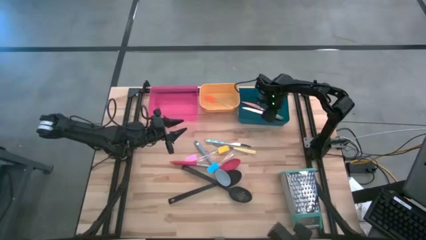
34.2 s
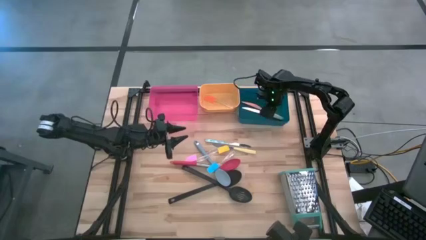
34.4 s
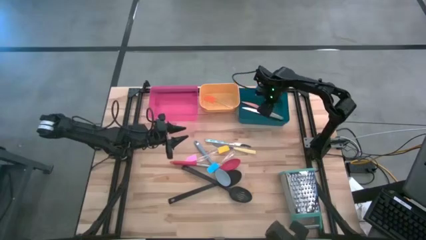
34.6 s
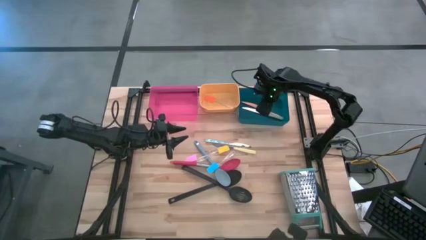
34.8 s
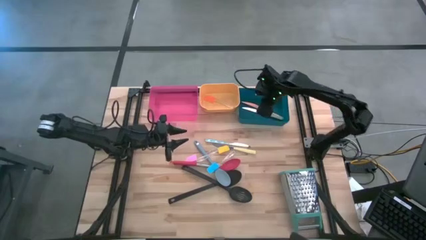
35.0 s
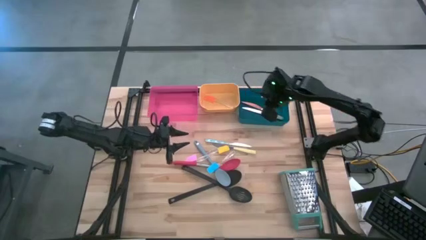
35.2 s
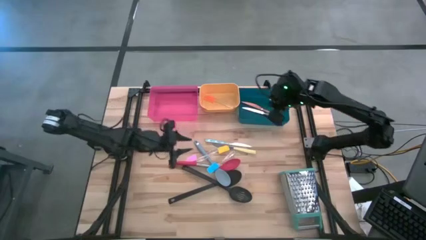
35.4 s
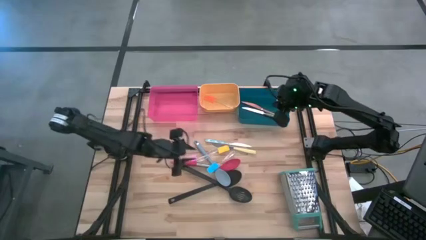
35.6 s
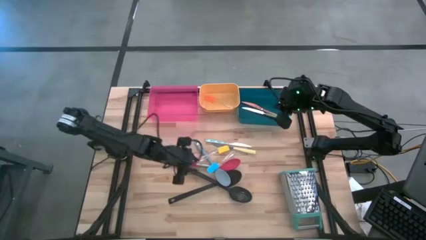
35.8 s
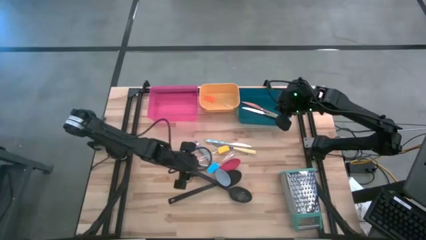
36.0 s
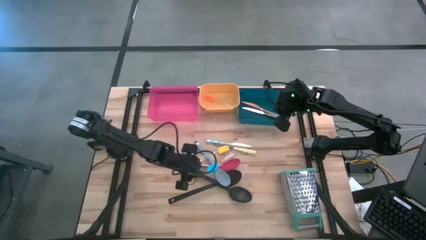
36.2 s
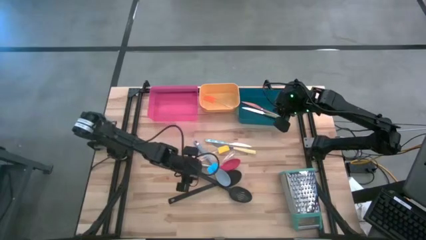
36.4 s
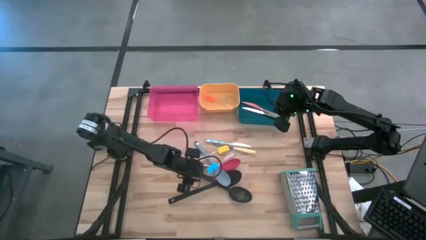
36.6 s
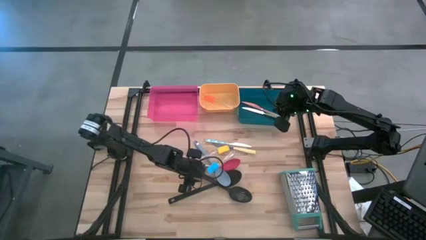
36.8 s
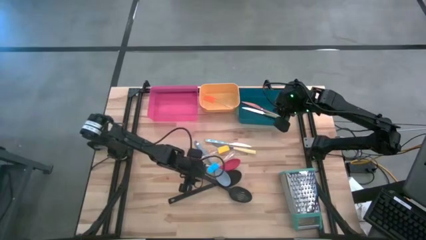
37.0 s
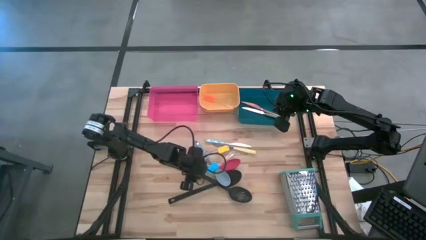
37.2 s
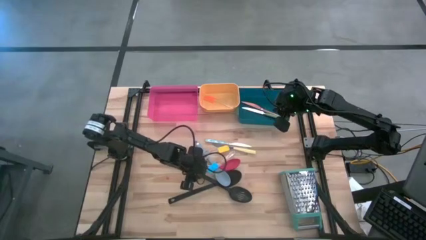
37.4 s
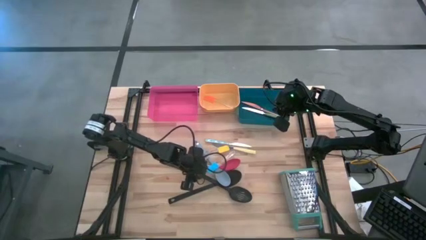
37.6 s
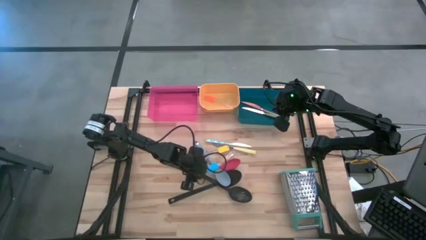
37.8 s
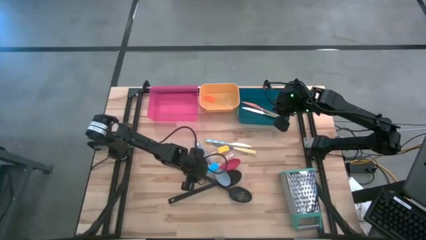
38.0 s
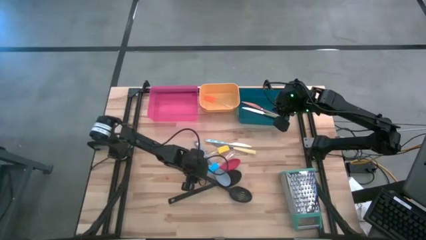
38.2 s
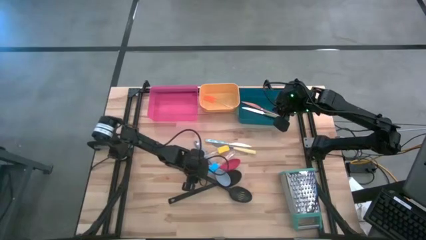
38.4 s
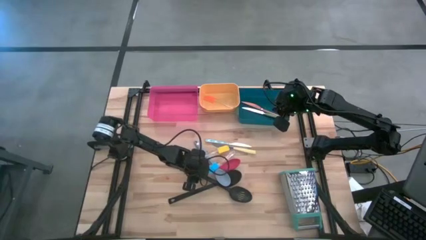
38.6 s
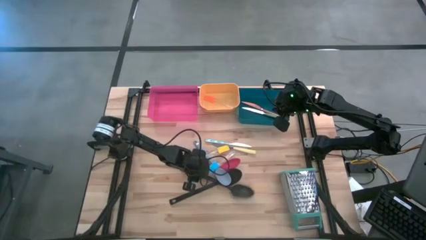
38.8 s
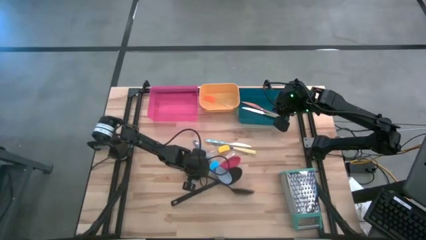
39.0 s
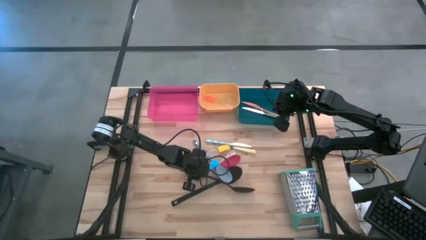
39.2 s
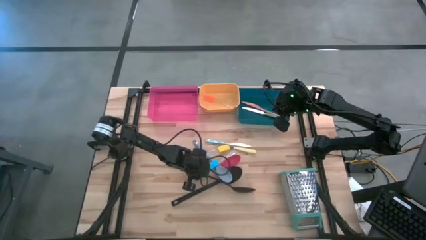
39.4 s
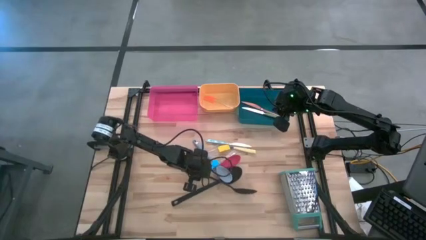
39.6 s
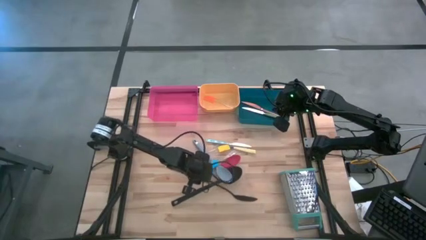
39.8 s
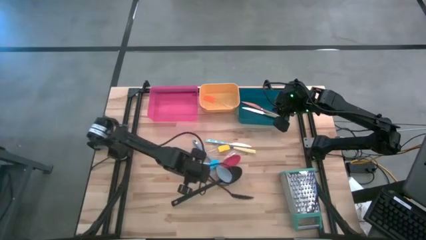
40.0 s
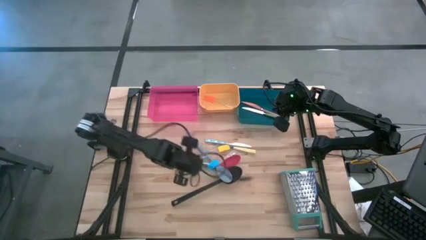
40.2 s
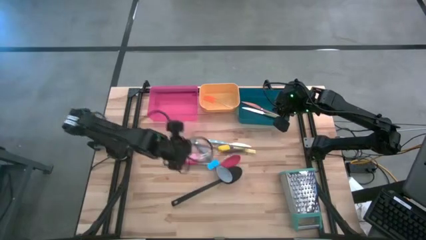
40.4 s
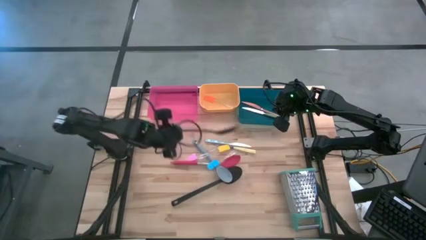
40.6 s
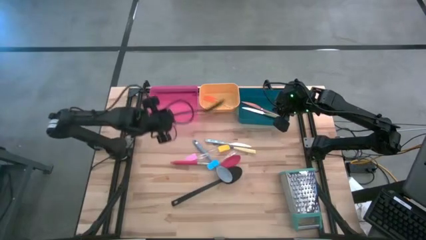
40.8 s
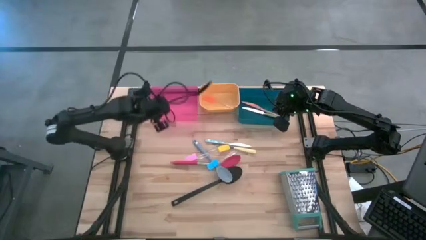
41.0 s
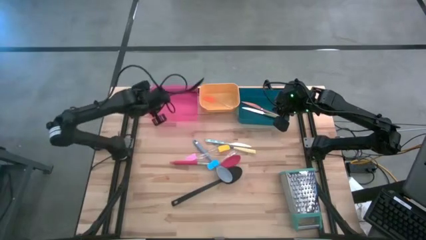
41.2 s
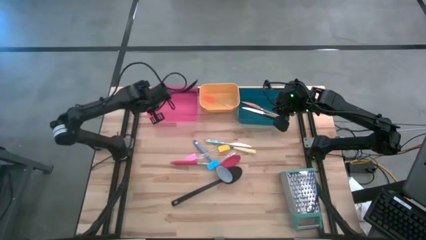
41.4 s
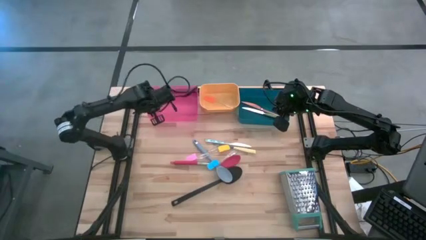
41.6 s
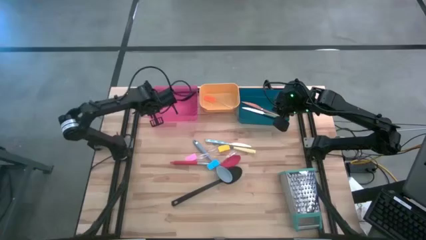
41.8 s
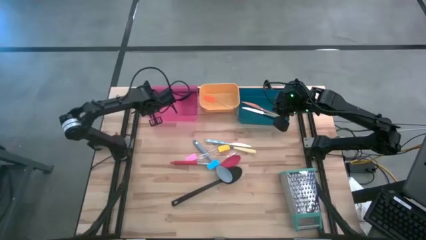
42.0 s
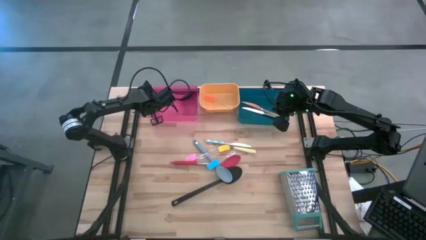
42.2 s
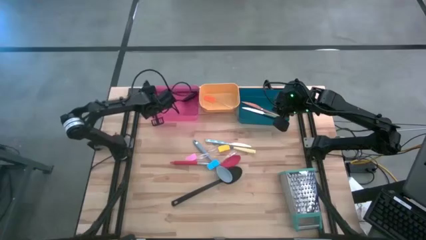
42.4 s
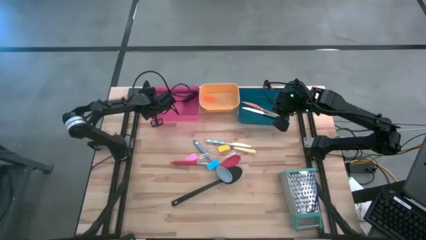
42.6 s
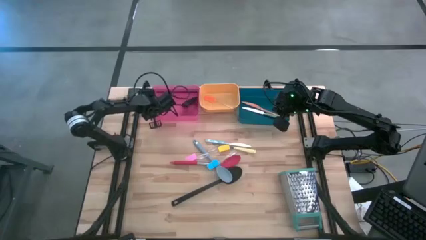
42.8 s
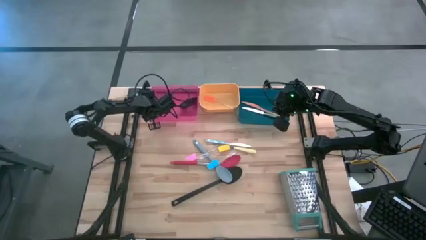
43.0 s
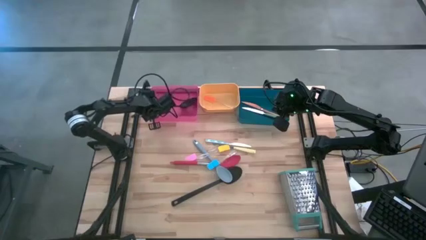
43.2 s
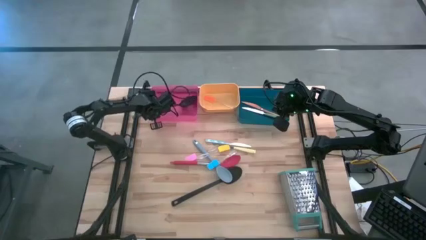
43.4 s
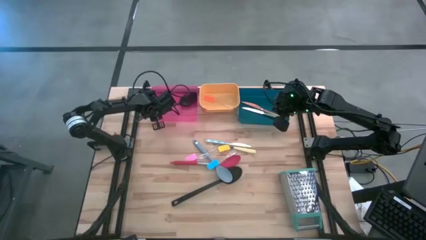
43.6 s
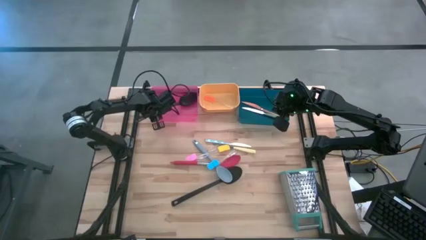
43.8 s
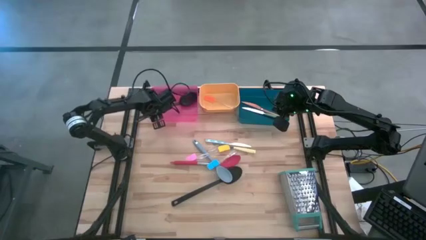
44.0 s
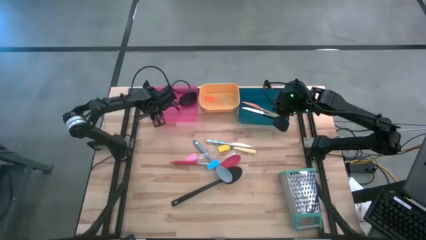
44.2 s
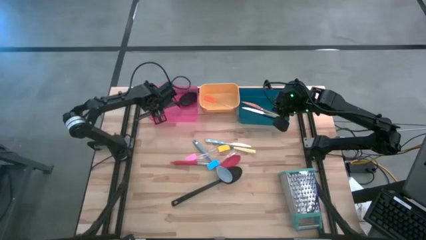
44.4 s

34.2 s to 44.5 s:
Task: Pick & Place Kitchen Items
Put the black spoon into the red bin

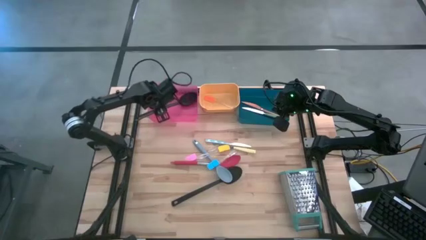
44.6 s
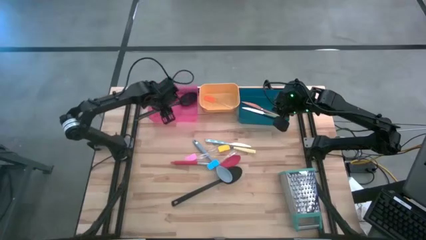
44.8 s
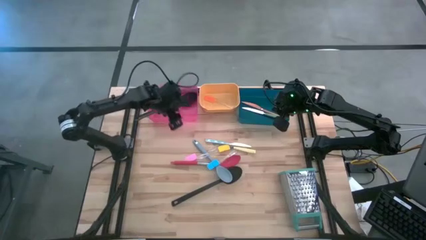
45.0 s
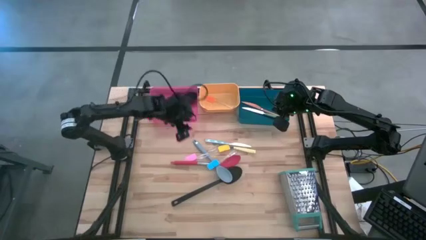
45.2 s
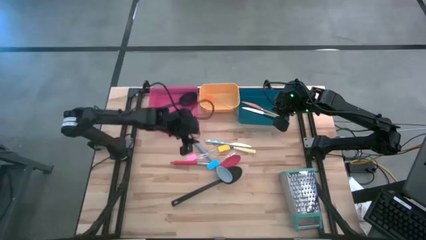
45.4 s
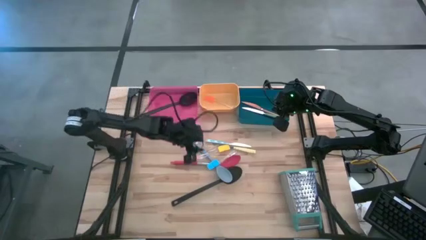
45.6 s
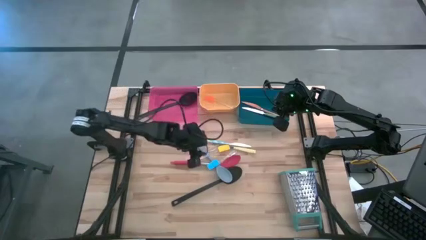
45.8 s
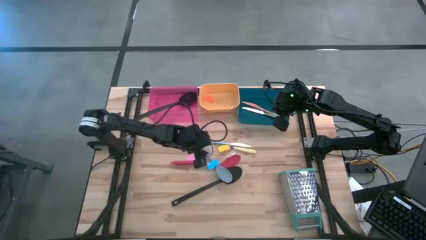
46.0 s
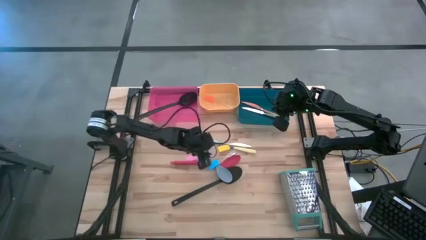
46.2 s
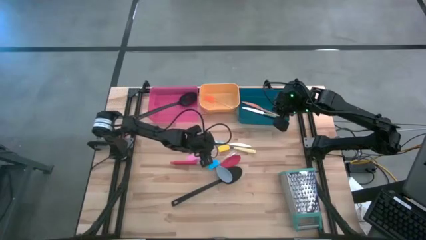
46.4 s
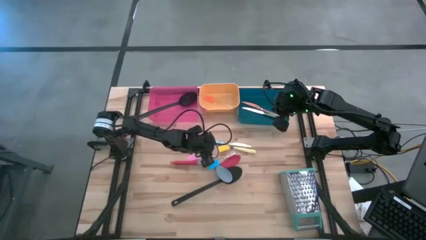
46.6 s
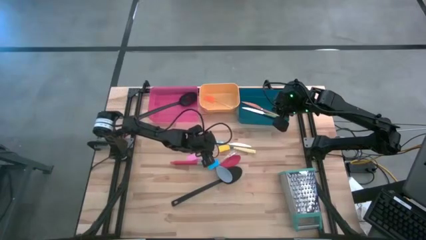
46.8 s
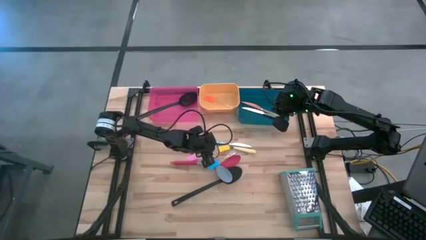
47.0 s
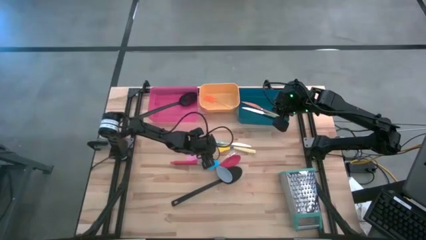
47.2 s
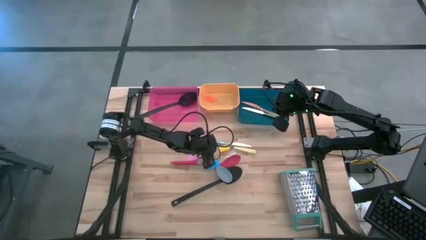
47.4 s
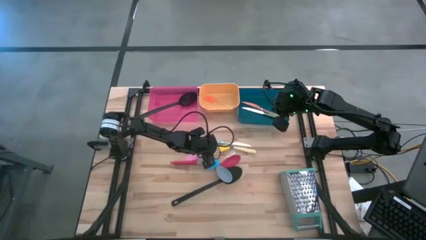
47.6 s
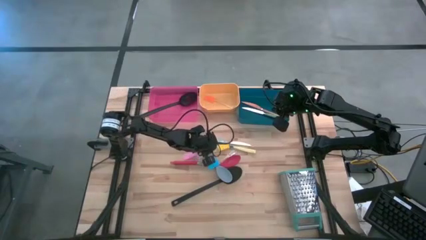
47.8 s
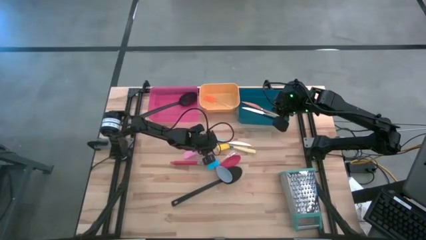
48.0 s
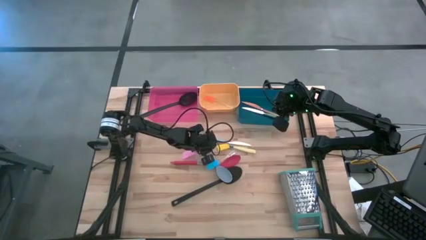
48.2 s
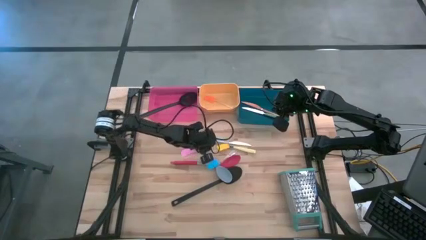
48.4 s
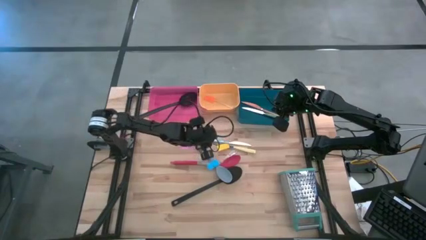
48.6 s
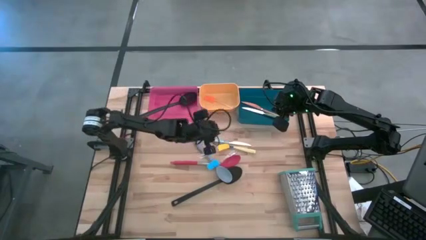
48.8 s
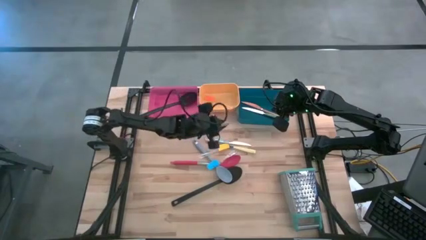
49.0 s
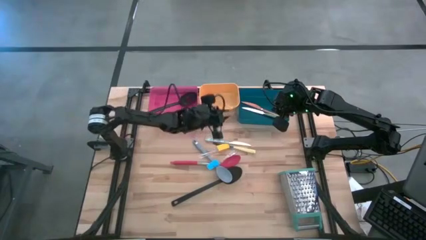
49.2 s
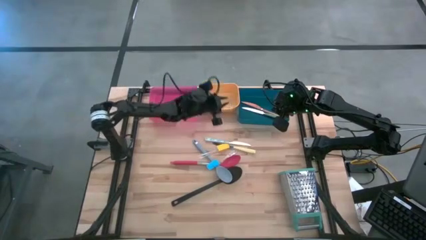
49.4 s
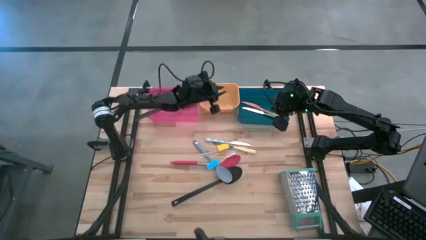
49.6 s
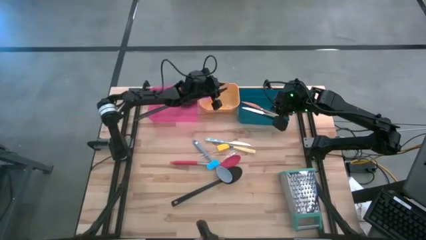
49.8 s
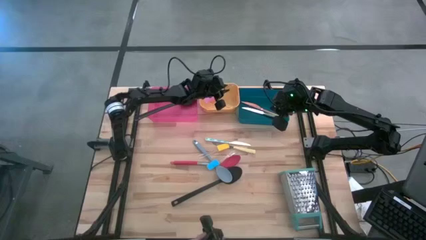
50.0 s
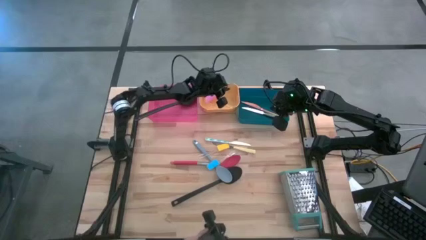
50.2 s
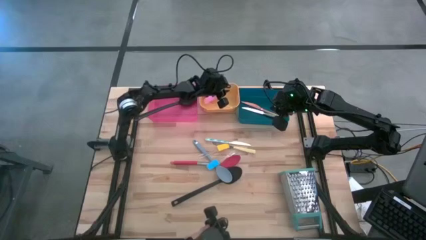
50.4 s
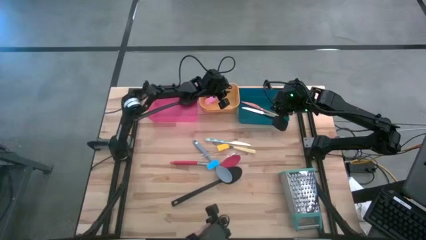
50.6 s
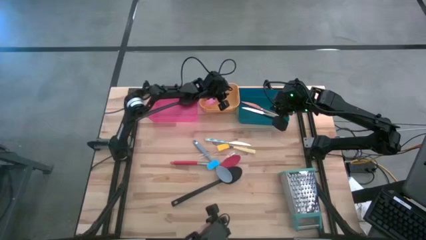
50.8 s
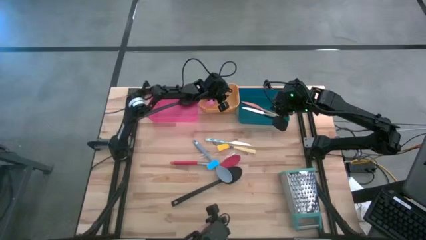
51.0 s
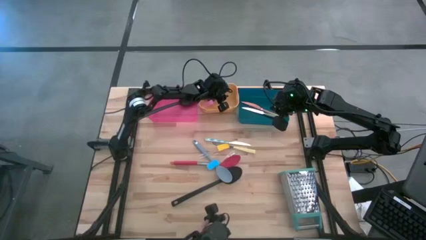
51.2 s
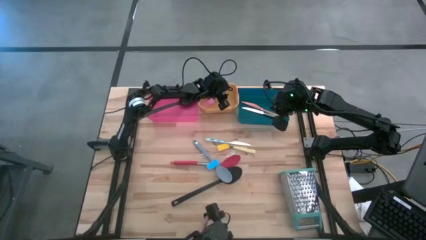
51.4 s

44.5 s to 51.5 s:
Put the pink spatula into the yellow bin
